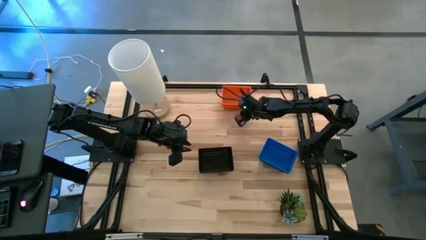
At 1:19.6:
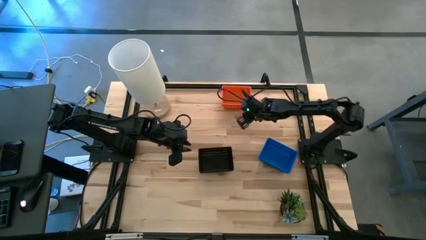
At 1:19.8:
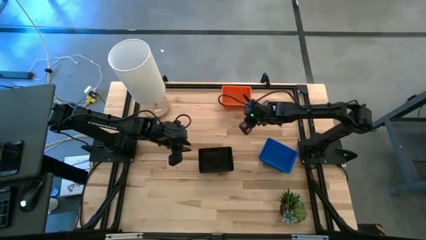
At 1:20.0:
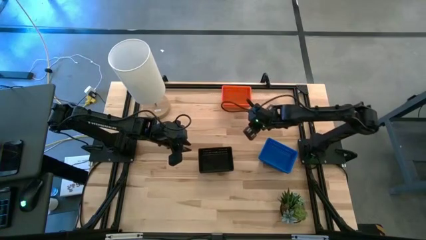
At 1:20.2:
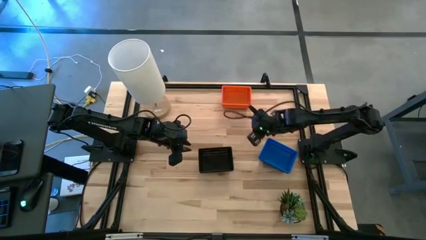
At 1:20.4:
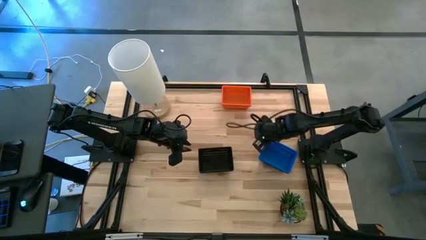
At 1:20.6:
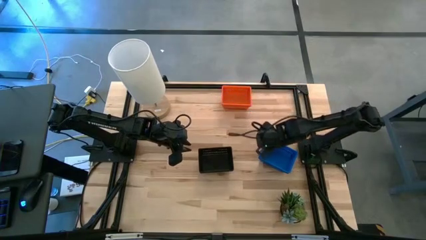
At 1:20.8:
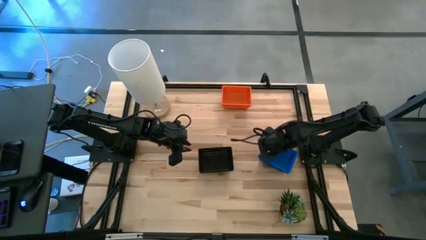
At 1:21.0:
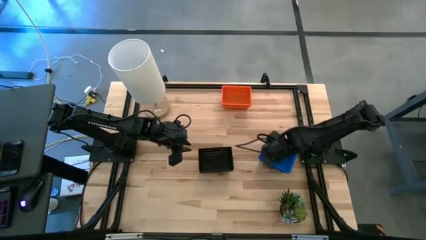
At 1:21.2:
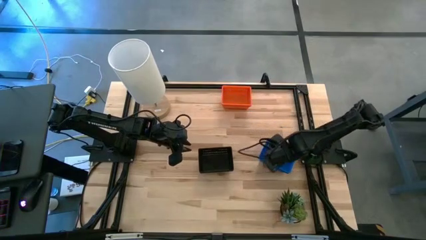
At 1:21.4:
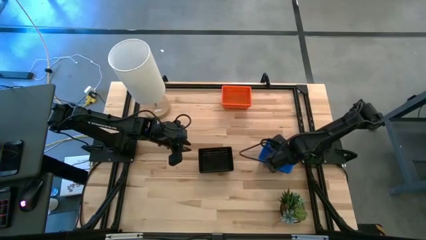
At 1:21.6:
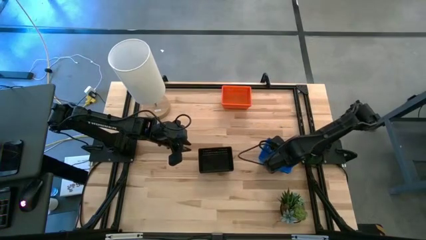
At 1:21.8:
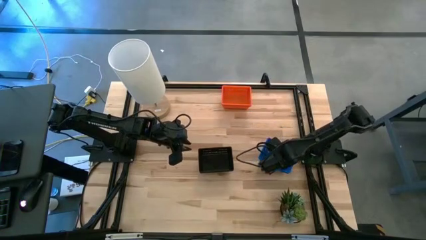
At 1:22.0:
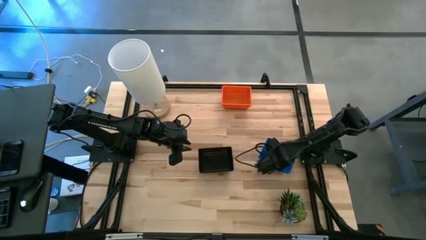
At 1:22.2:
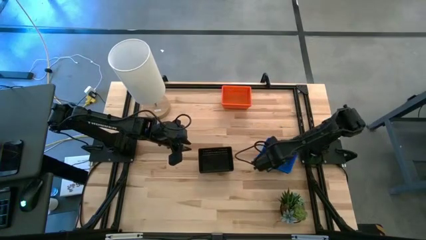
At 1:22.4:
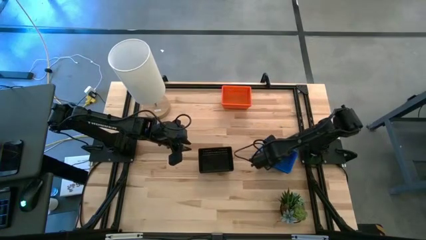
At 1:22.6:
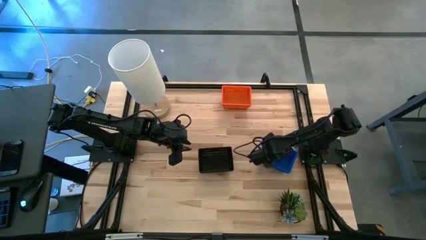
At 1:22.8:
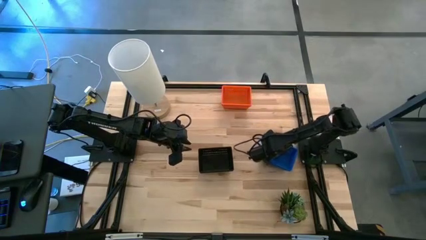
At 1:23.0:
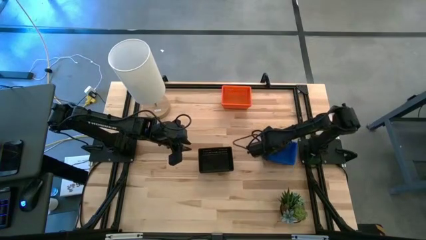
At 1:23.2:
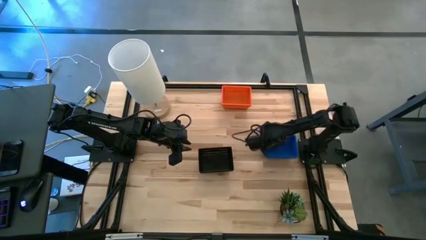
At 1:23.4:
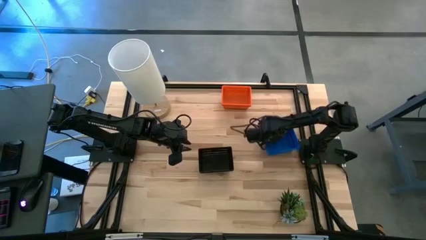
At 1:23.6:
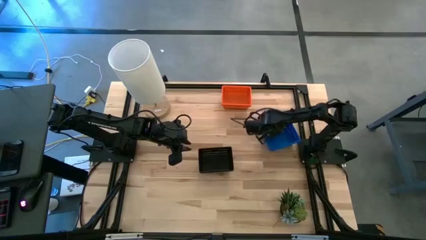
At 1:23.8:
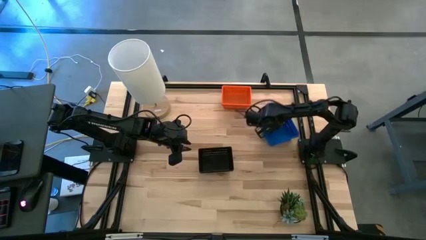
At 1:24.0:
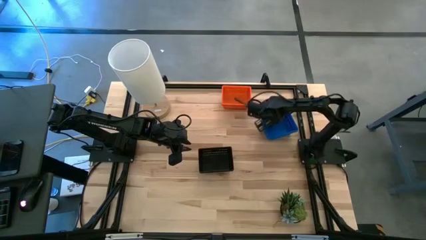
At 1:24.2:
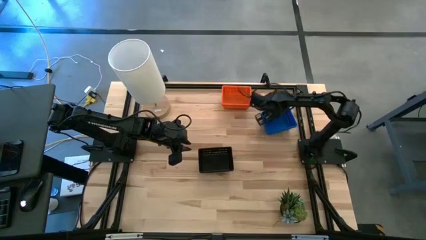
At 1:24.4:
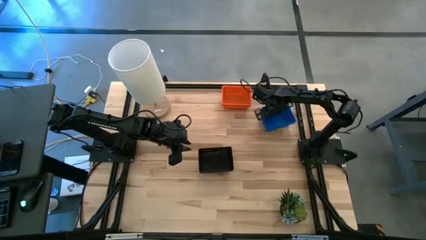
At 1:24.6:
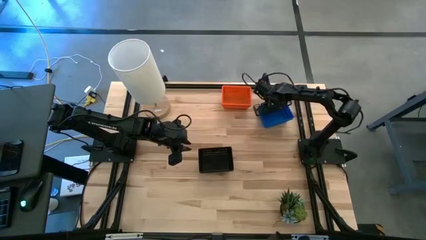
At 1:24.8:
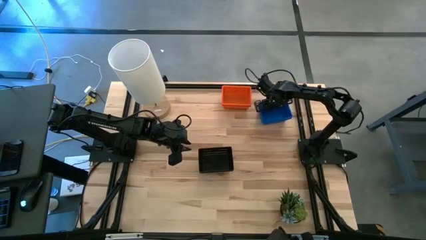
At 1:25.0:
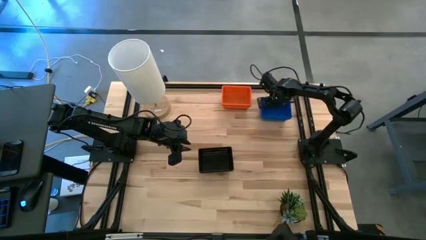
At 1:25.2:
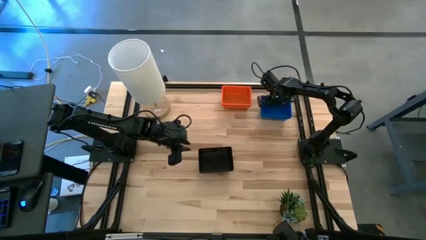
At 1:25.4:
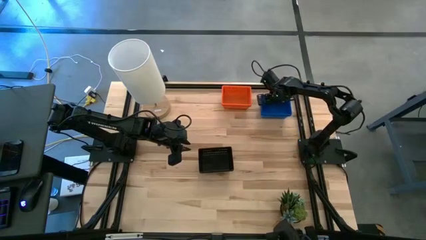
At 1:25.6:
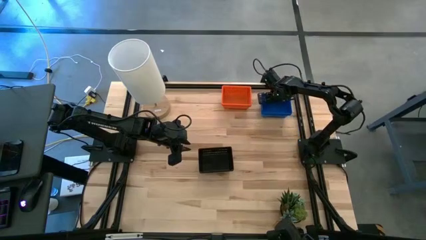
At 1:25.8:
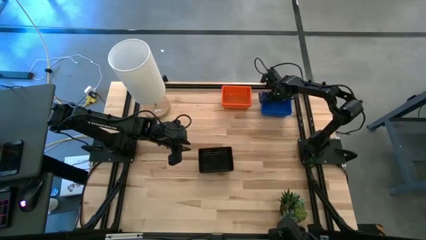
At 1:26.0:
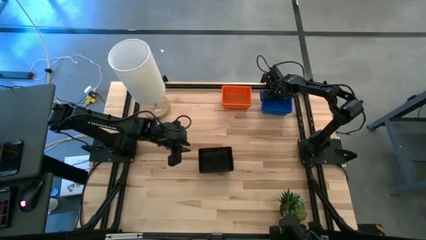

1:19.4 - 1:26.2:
Move the stack of blue bins to the top right of the table

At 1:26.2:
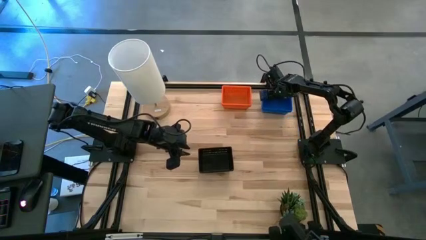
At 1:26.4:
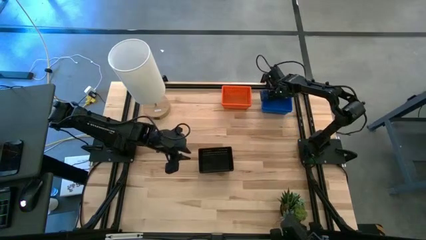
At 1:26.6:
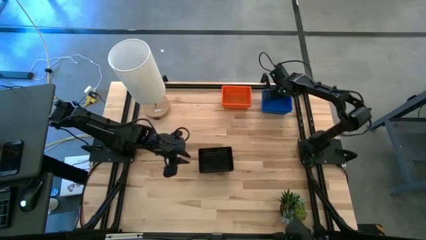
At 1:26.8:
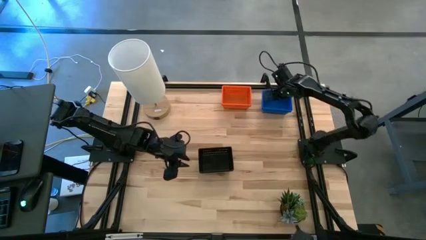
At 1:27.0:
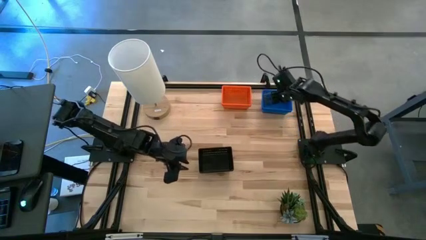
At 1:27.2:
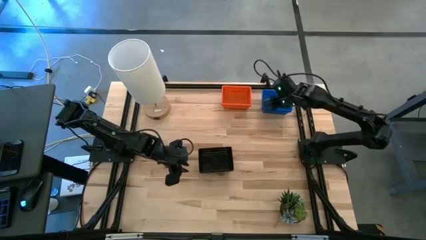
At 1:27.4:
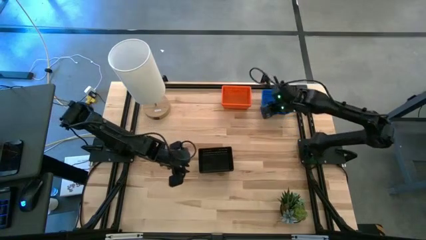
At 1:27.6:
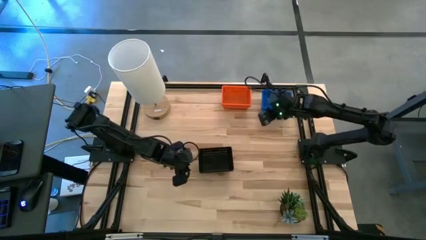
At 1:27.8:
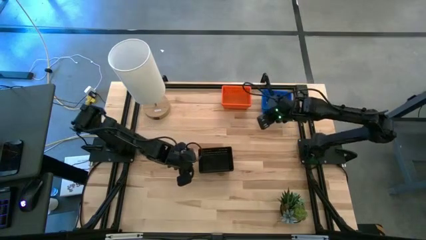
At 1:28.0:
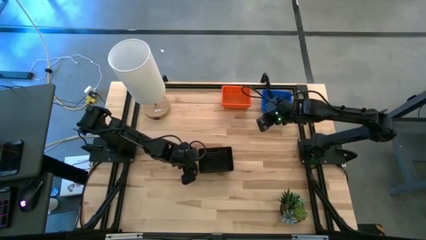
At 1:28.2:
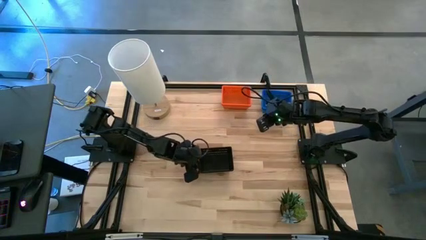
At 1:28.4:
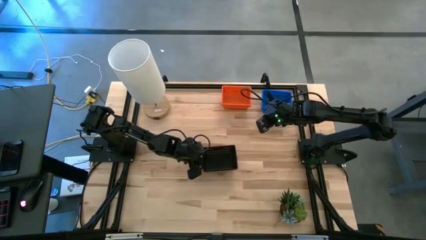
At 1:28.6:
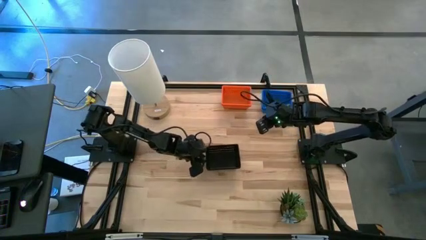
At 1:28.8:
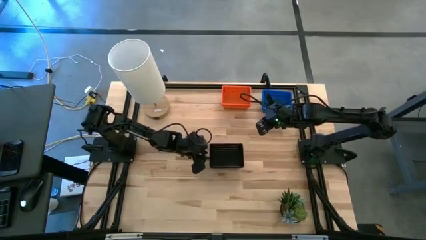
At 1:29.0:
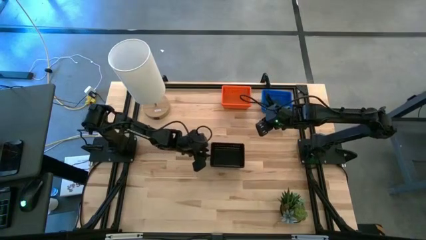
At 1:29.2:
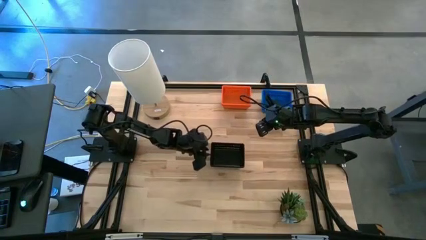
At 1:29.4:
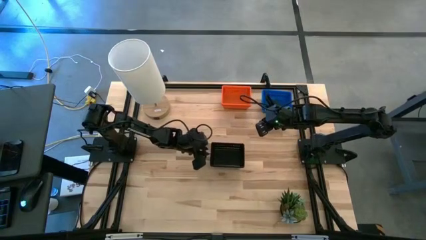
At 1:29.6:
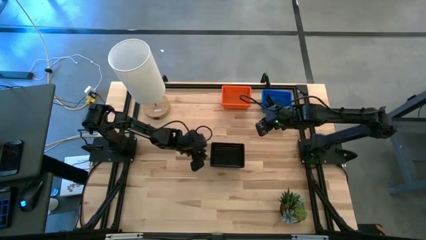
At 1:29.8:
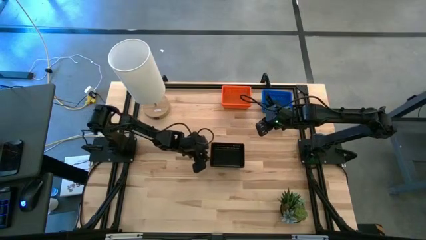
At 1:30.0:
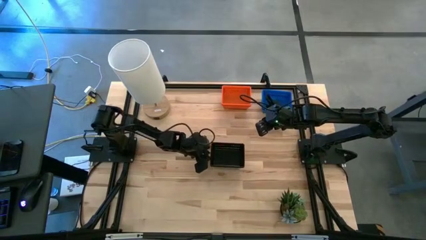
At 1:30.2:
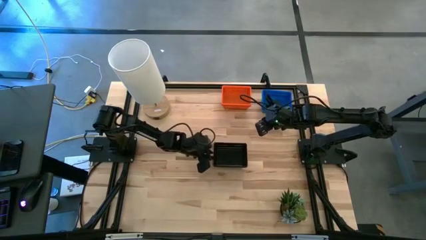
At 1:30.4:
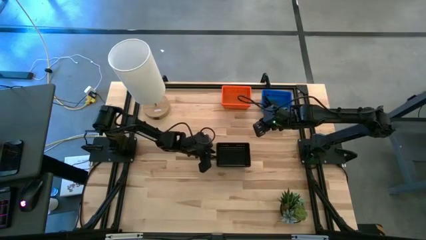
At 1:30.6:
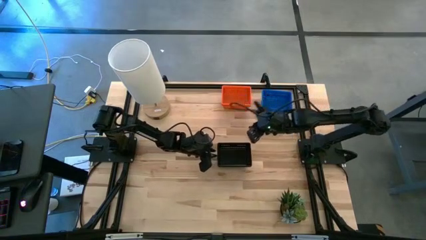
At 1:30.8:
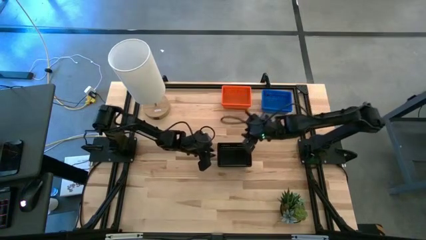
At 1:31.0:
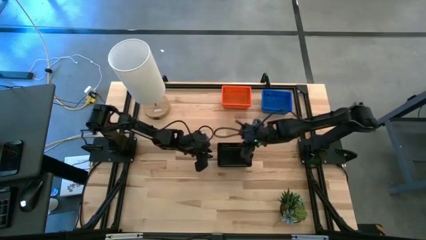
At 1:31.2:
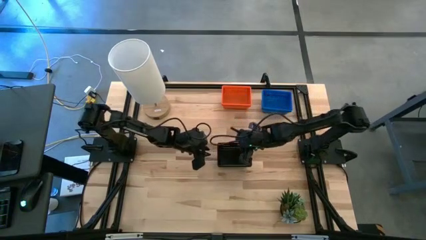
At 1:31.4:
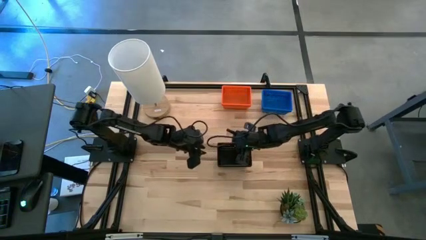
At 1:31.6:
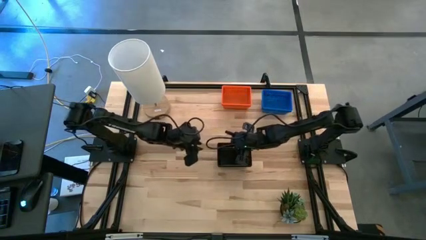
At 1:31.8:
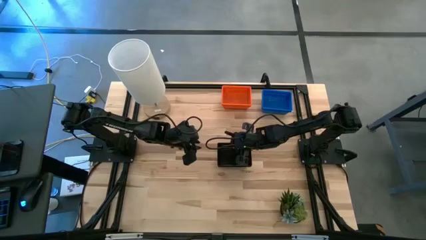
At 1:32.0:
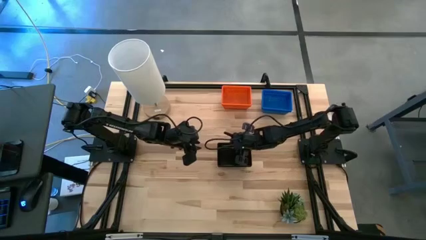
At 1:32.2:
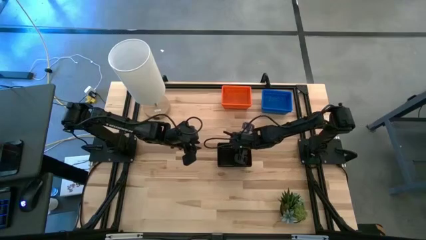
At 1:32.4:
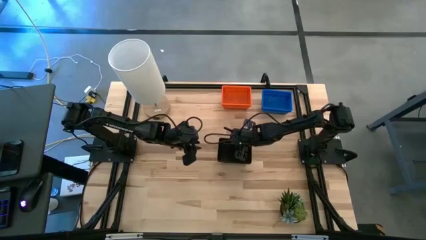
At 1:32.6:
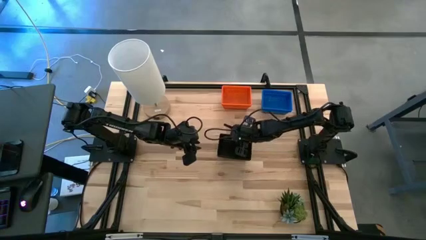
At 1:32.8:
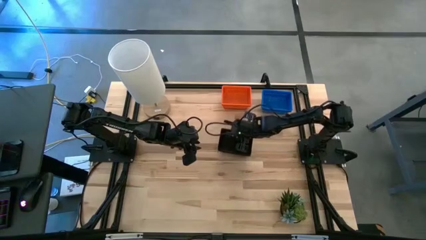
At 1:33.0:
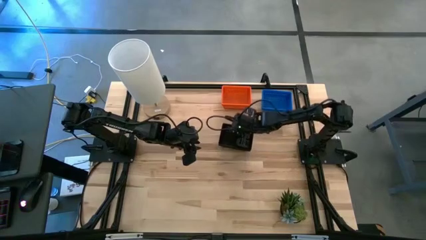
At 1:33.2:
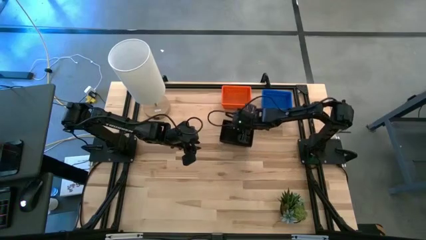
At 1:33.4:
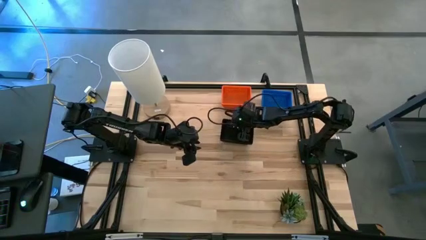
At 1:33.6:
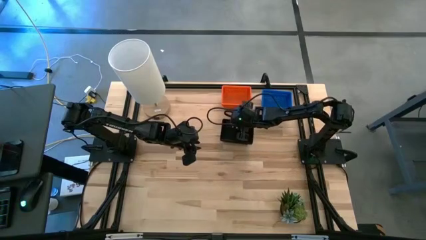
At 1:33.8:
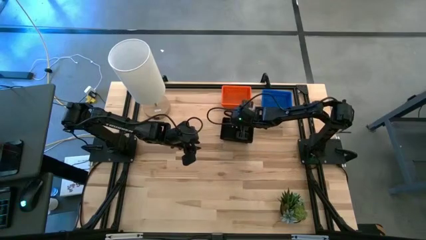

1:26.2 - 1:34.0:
Move the stack of black bins to the top center of the table below the stack of orange bins
